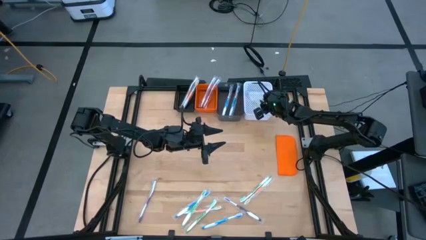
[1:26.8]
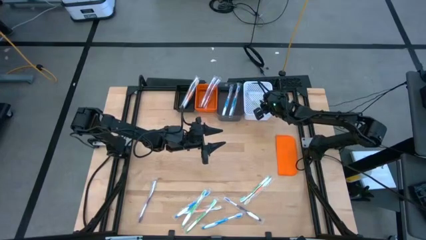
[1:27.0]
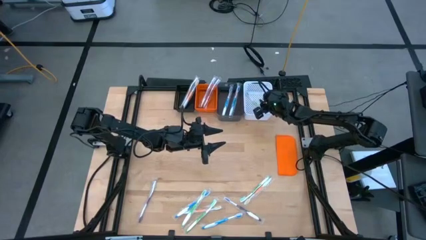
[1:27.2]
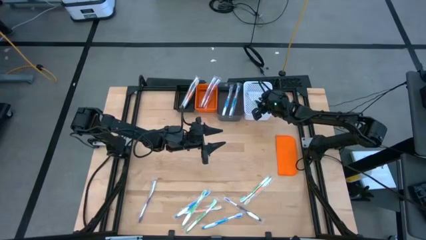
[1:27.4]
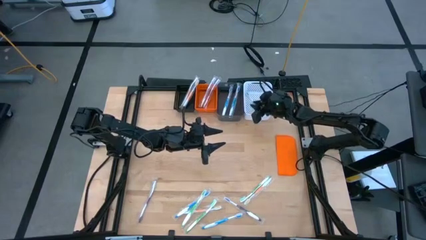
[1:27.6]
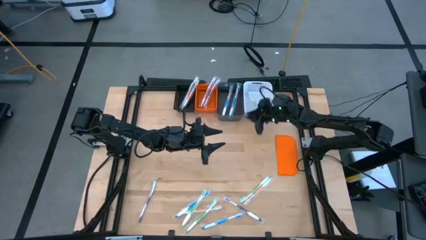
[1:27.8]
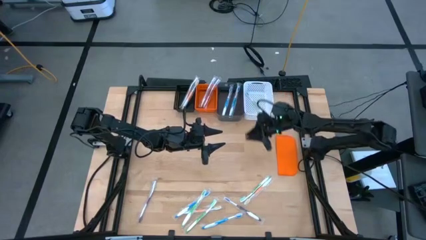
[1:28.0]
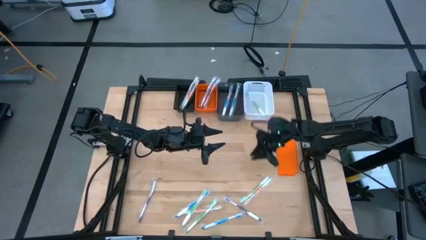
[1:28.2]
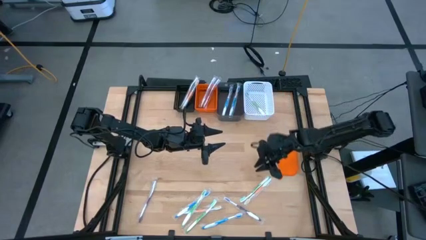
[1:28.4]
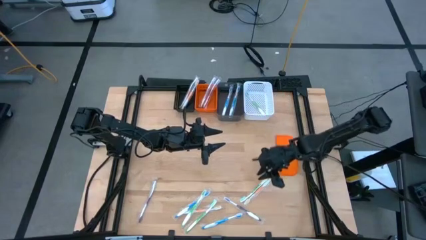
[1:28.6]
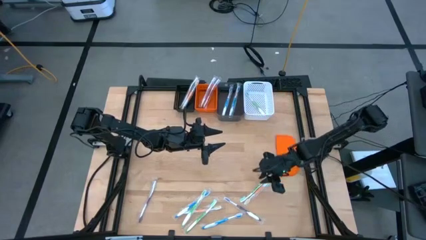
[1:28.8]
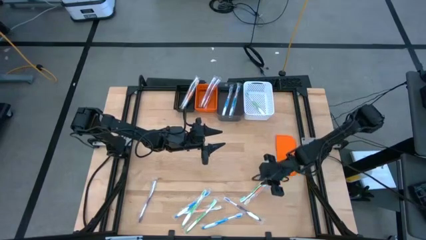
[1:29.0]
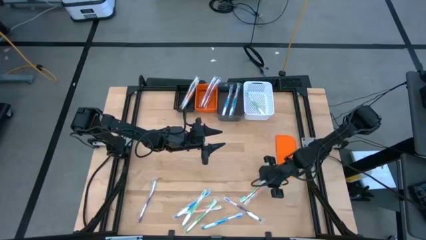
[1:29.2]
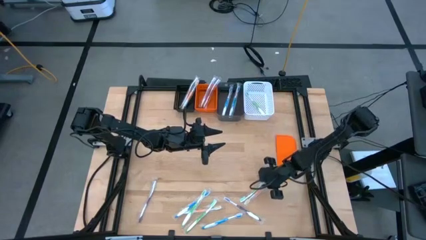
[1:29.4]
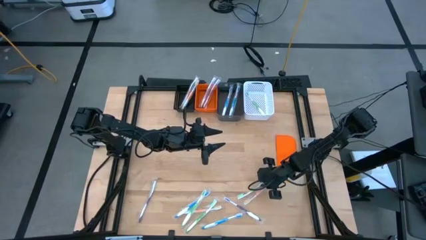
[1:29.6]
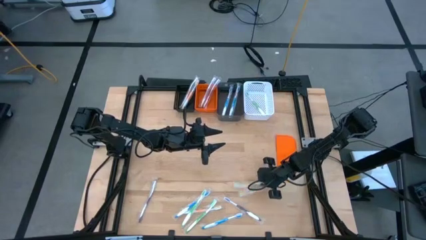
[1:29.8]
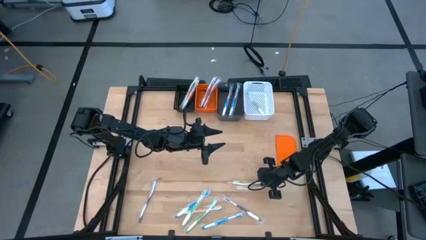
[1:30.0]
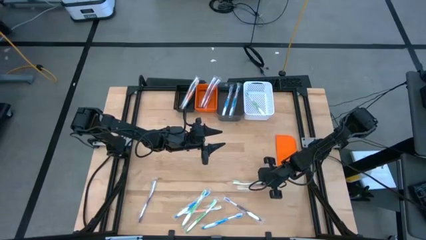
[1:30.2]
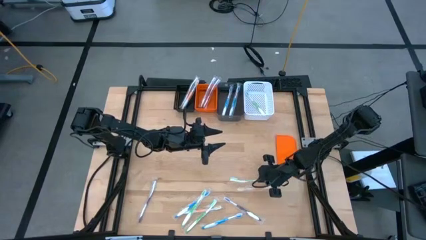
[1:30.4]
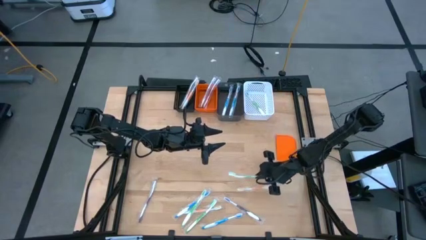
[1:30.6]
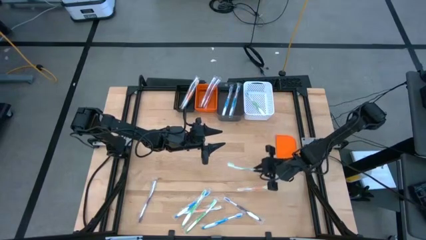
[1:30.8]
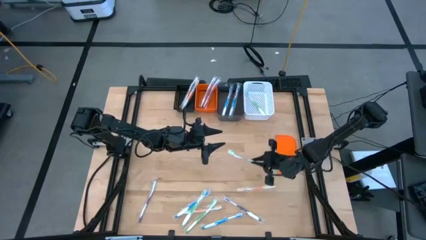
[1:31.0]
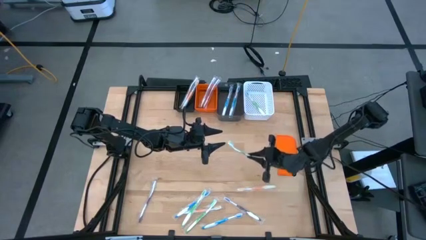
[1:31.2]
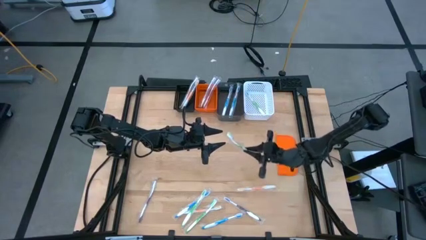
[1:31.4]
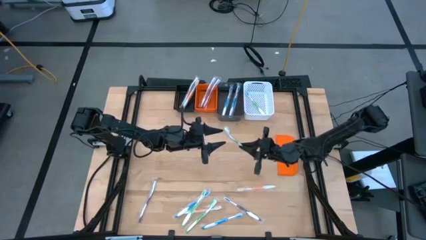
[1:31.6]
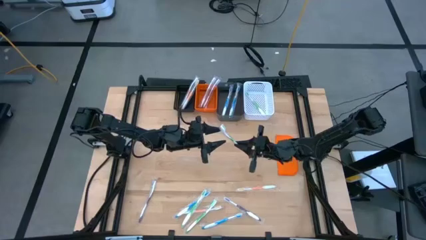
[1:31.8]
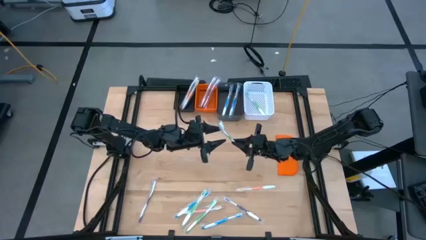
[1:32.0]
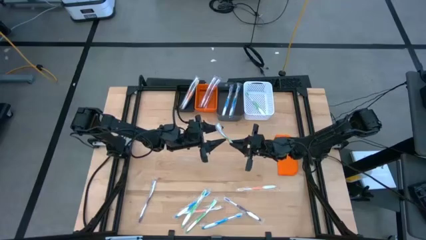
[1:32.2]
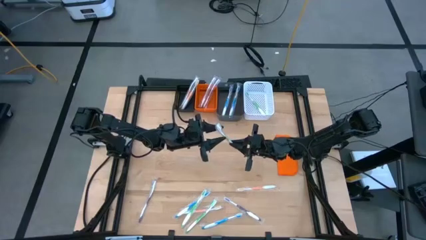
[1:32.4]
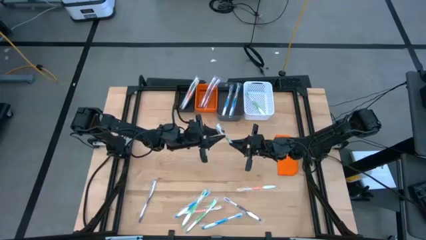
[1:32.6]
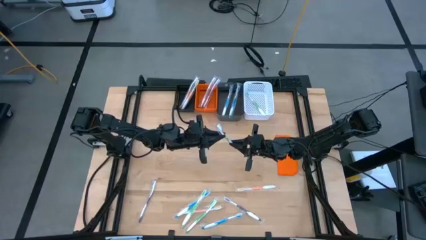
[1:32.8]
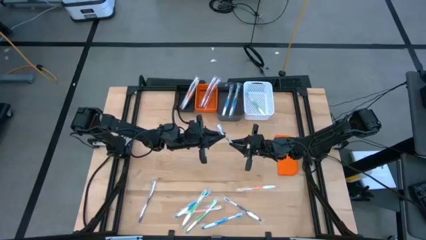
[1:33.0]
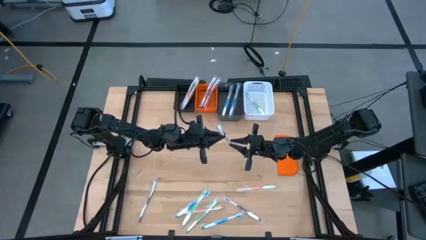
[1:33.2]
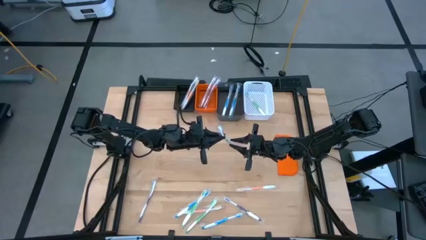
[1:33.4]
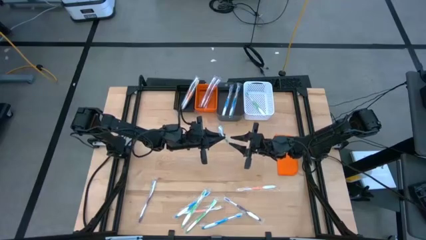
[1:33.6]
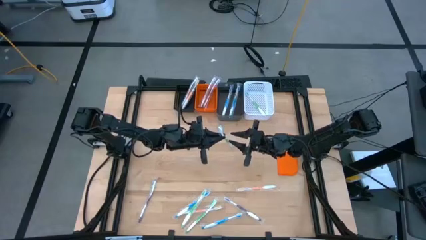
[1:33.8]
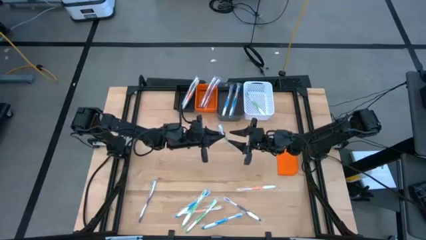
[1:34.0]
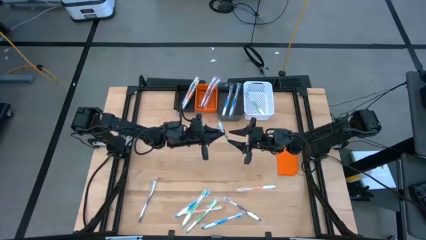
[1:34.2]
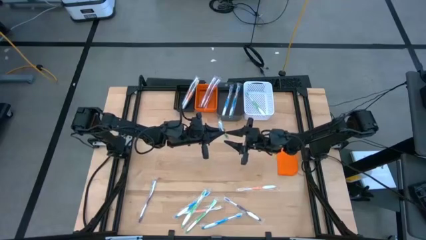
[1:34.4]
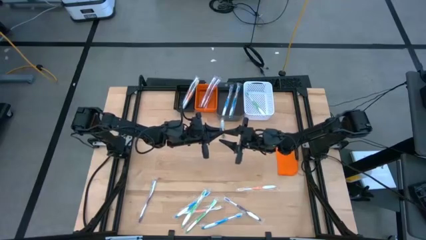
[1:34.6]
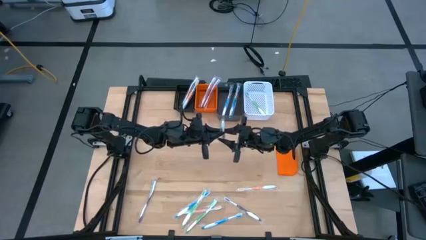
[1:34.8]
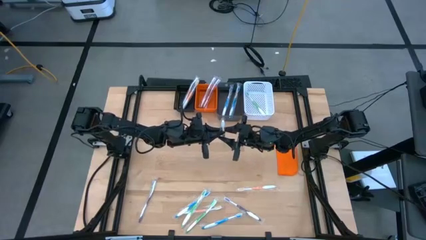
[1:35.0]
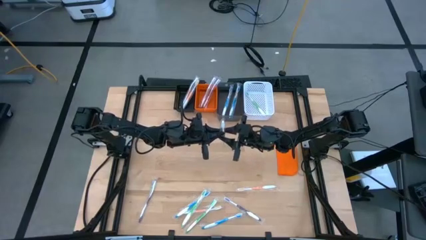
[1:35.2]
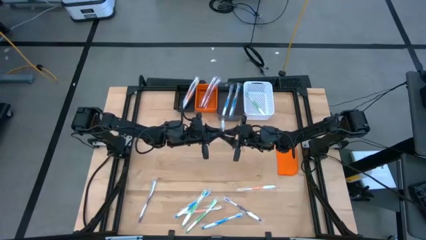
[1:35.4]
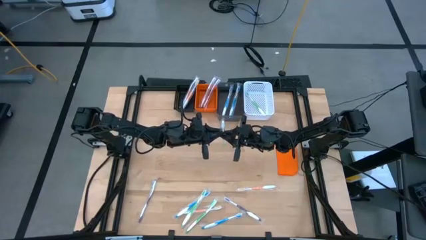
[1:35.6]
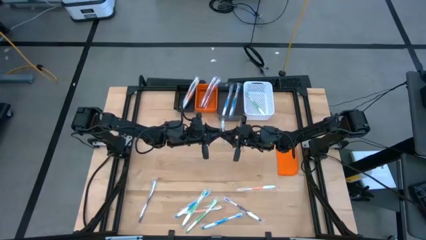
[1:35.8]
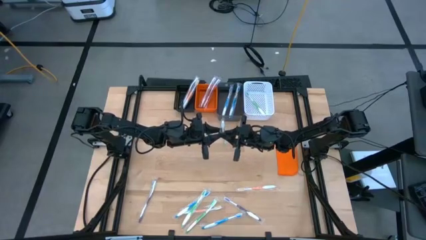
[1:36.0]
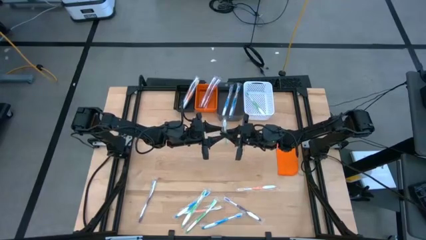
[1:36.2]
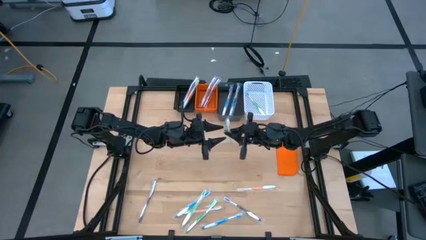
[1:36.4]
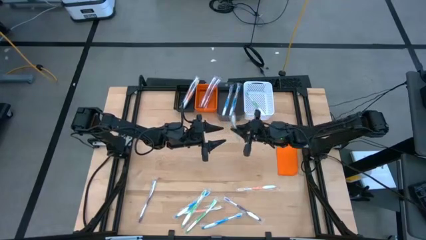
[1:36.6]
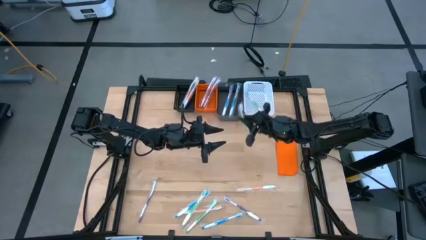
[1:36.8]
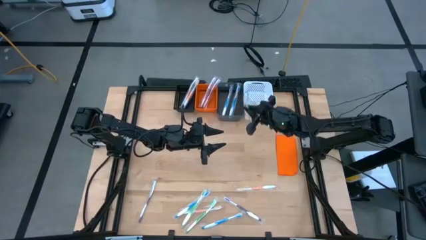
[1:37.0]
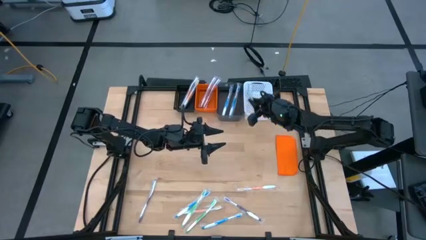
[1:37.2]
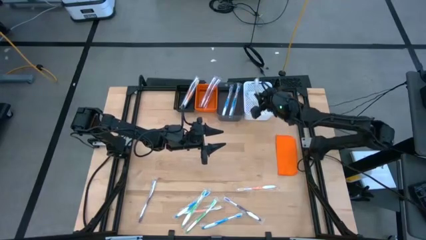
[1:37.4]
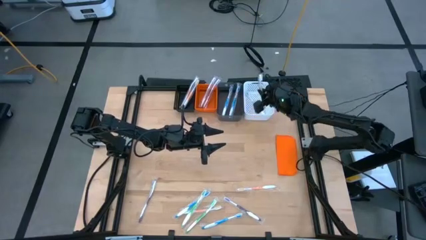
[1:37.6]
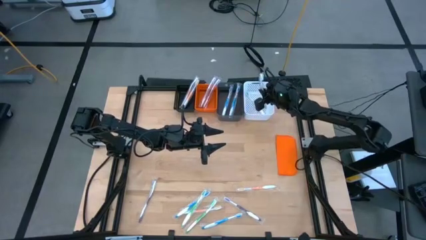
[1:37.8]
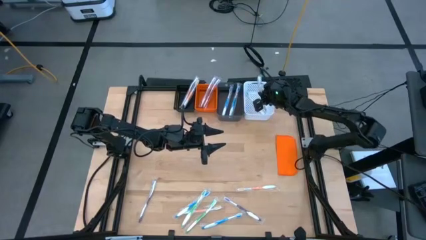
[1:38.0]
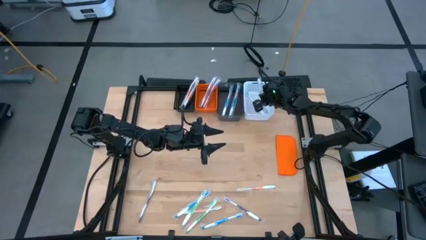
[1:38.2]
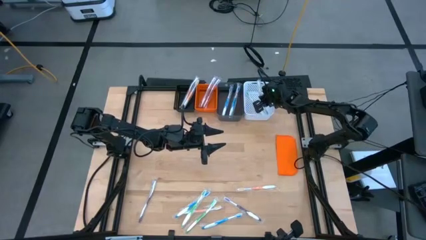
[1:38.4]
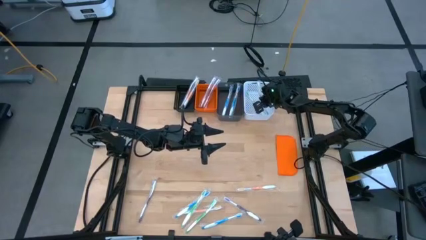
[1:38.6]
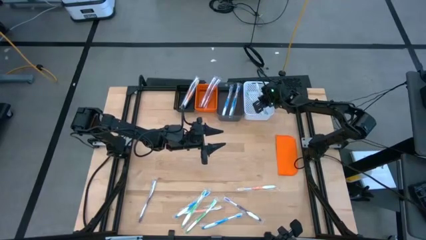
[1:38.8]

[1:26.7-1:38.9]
Task: Pick & Place Toothbrushes
Put the green toothbrush into the white bin

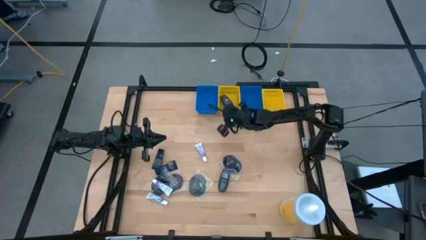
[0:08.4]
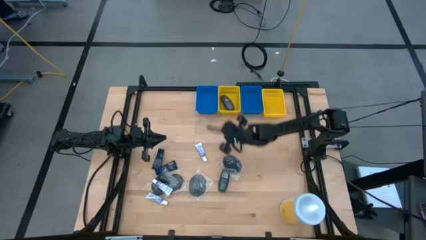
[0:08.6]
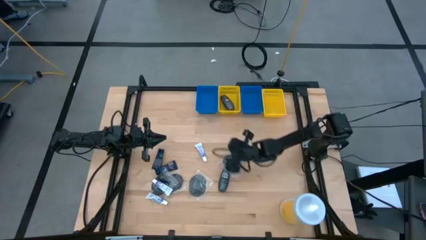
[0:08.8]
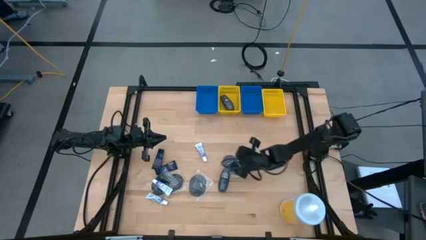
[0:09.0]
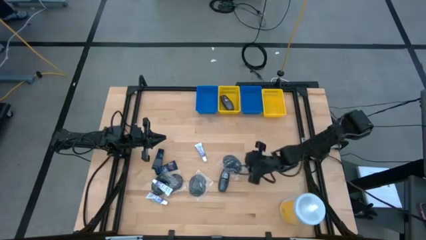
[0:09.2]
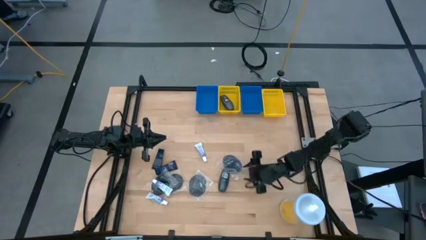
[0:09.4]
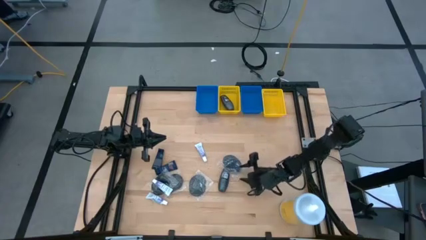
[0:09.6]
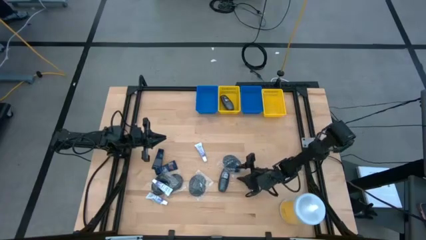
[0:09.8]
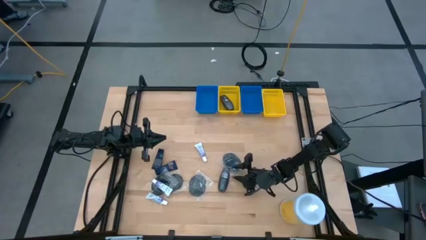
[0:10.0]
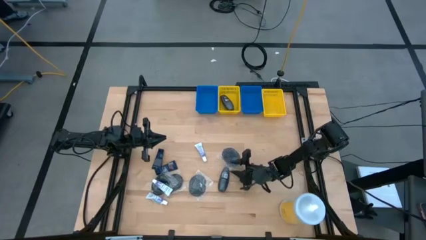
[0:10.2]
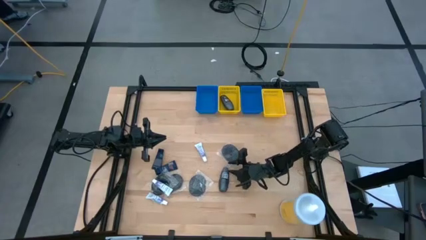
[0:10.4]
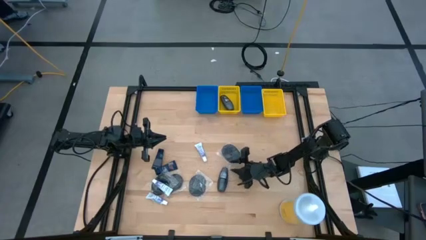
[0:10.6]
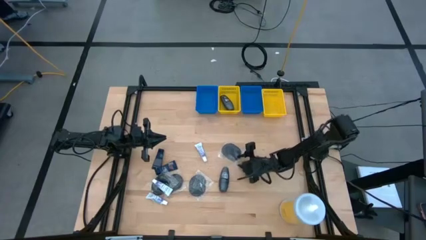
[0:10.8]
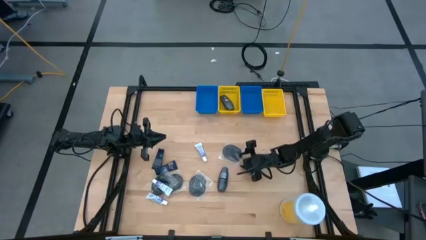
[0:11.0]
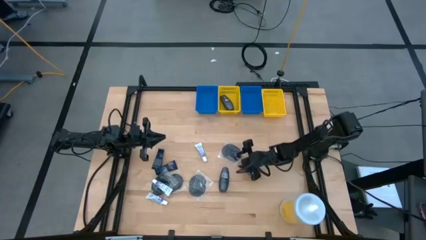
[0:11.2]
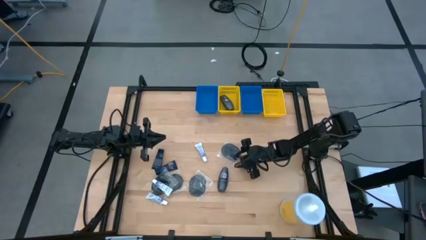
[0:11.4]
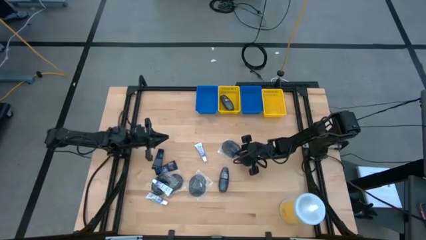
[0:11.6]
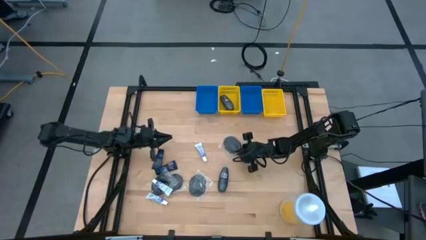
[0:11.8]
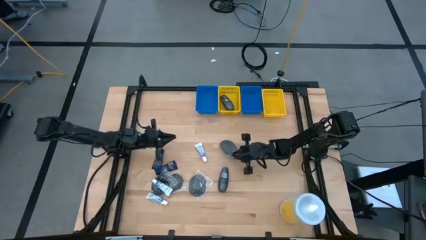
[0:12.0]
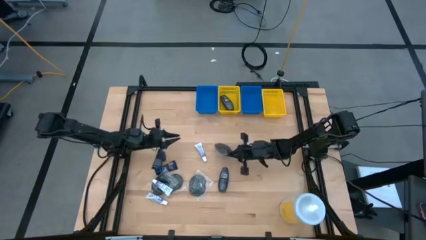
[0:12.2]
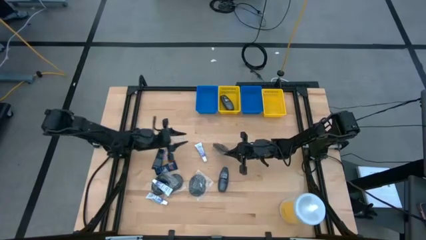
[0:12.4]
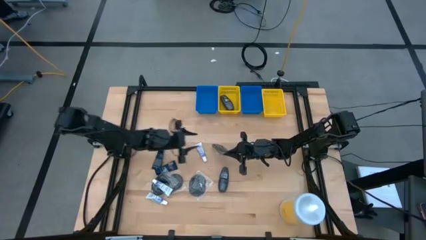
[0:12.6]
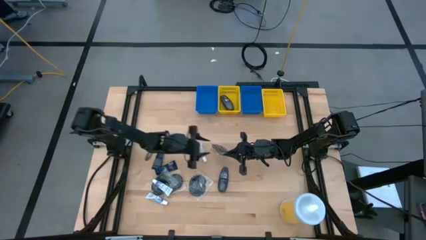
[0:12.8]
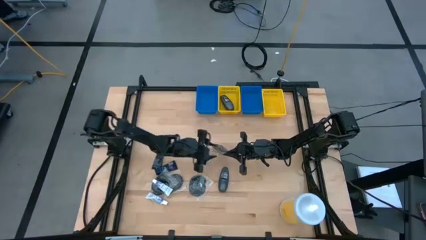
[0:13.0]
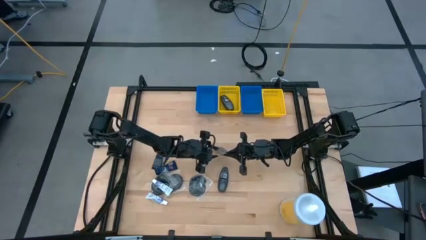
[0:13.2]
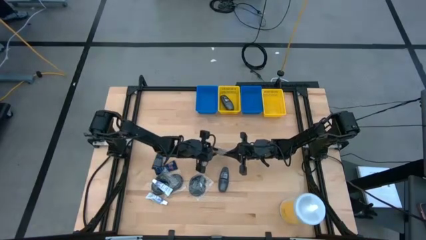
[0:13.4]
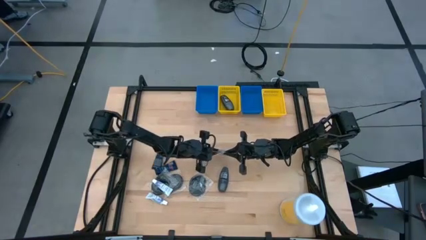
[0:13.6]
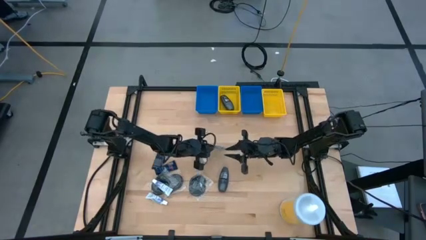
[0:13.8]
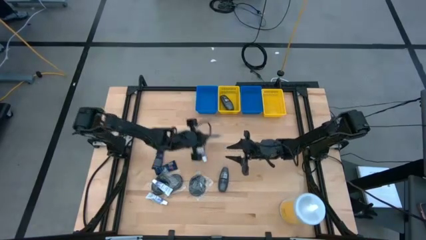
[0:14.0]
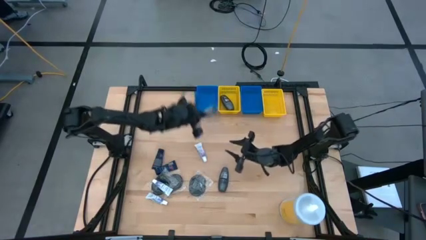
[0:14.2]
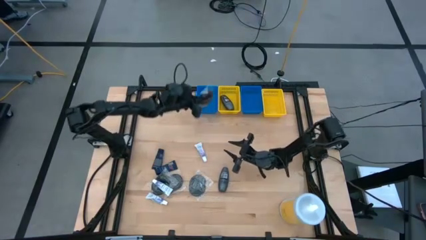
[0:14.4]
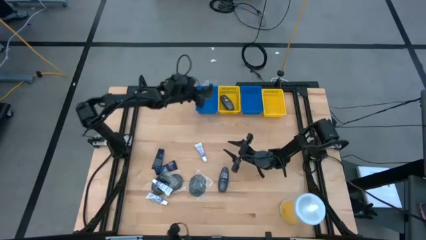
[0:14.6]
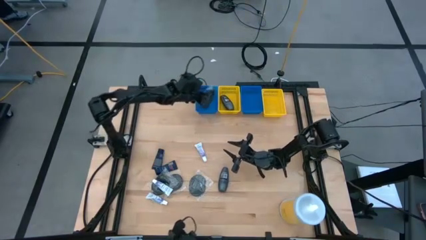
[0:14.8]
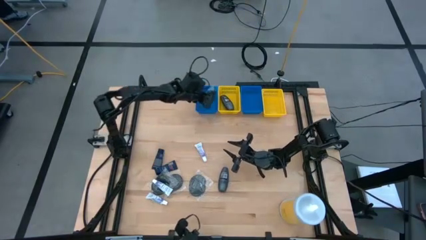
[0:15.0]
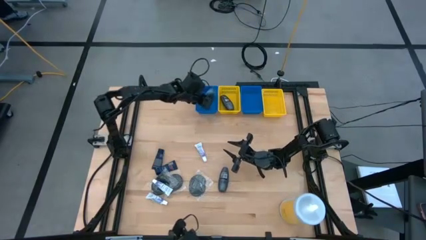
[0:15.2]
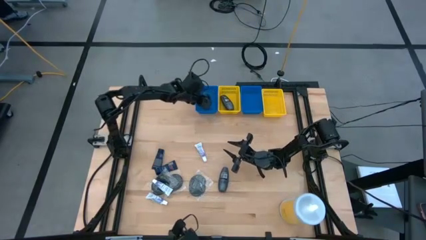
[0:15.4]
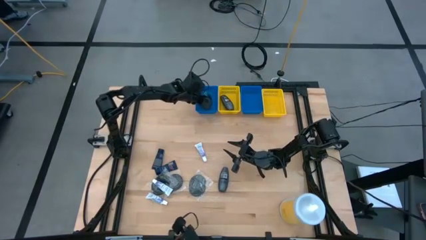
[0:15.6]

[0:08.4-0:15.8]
Task: Pick & Place Travel size toiletries
Put the black hairbrush into the left blue bin
